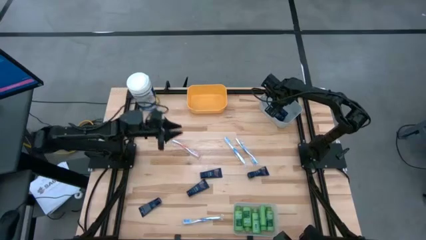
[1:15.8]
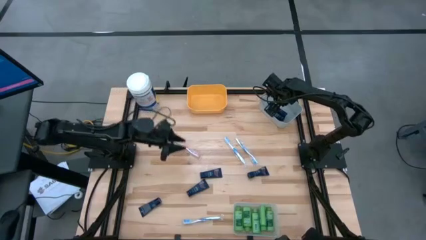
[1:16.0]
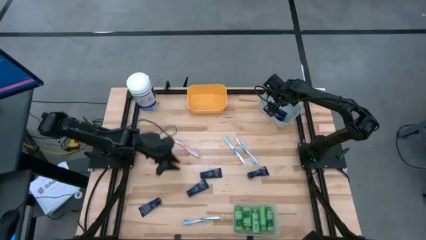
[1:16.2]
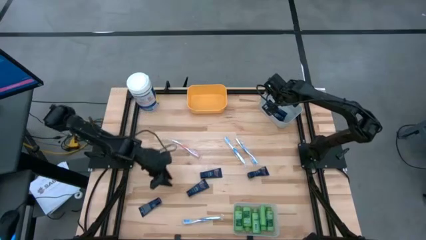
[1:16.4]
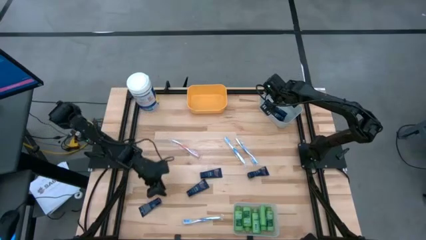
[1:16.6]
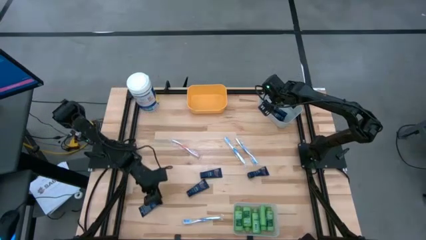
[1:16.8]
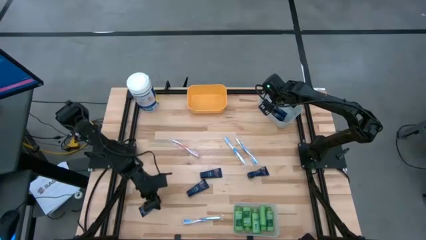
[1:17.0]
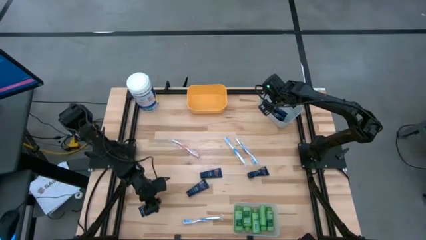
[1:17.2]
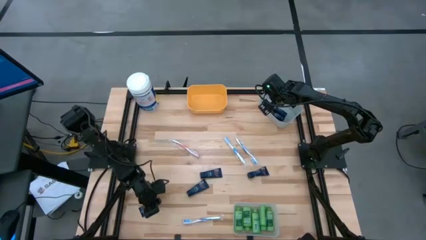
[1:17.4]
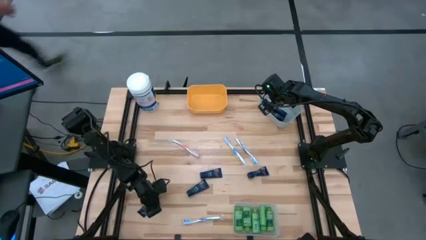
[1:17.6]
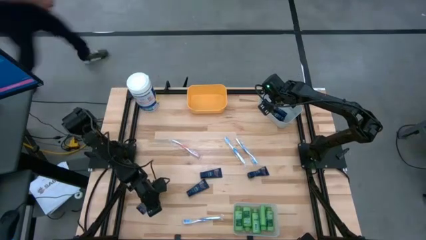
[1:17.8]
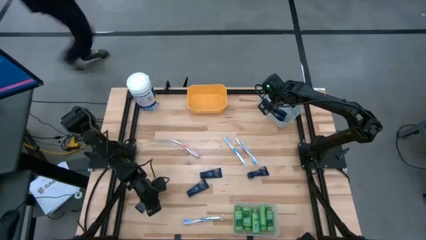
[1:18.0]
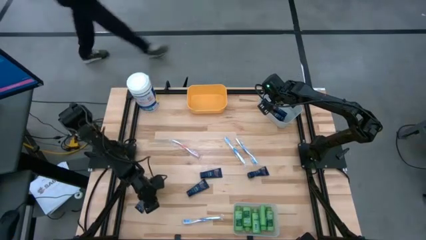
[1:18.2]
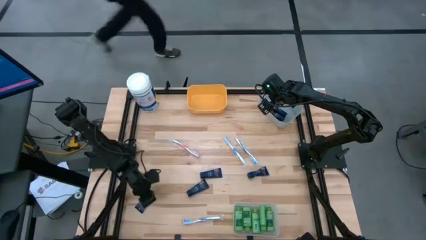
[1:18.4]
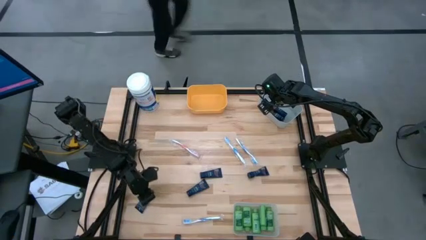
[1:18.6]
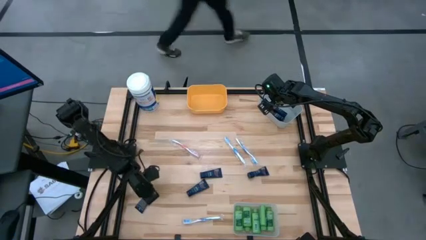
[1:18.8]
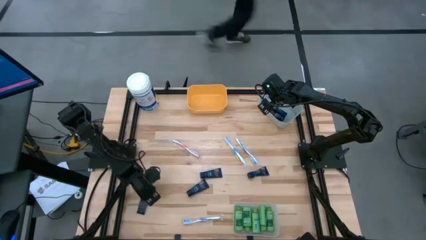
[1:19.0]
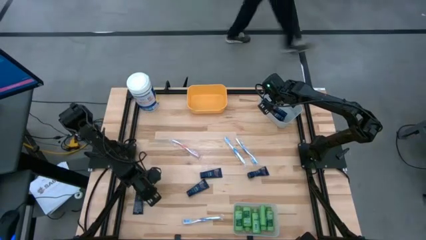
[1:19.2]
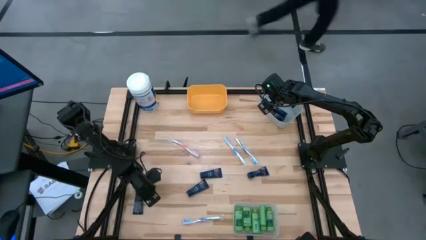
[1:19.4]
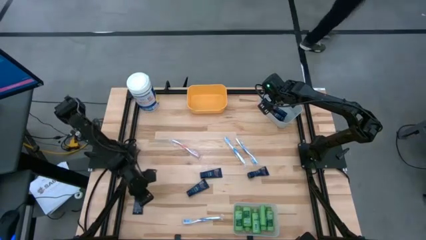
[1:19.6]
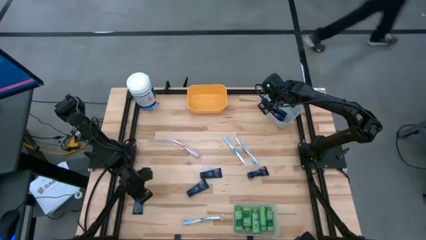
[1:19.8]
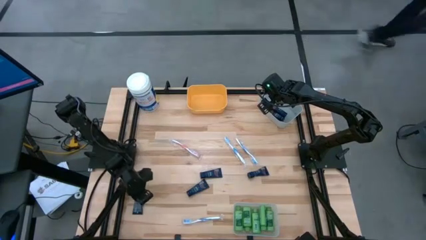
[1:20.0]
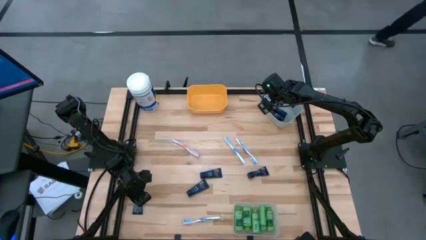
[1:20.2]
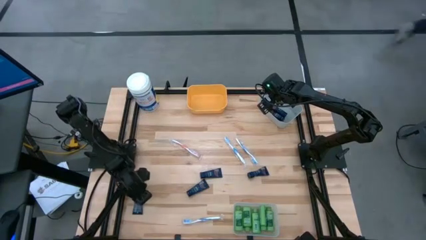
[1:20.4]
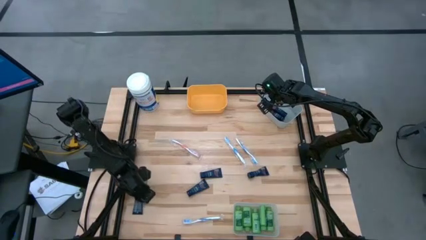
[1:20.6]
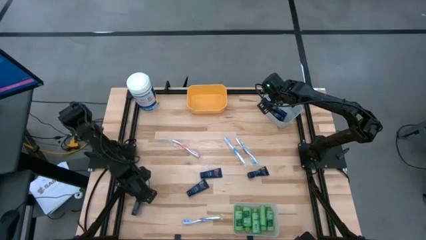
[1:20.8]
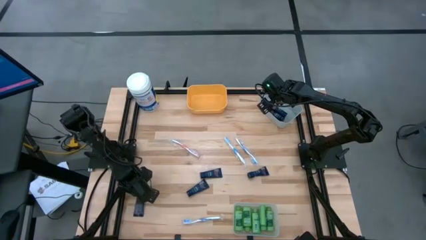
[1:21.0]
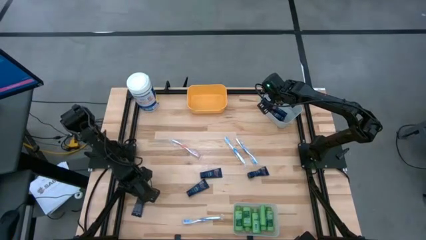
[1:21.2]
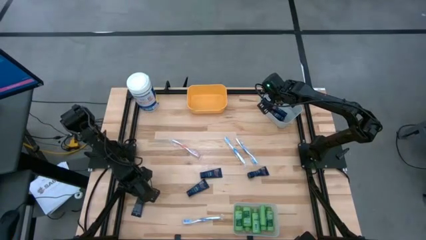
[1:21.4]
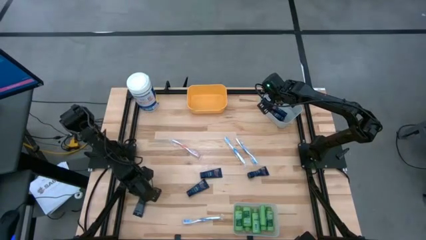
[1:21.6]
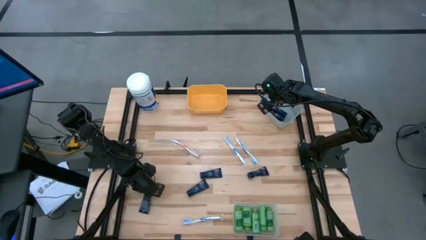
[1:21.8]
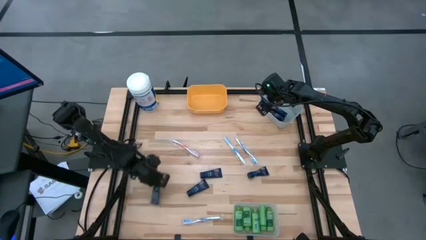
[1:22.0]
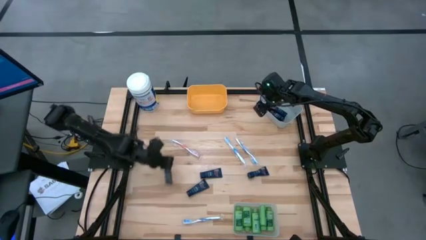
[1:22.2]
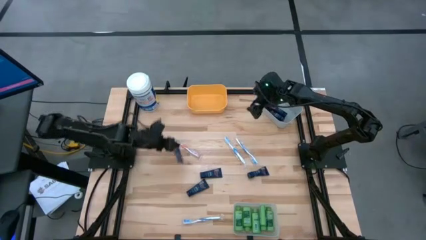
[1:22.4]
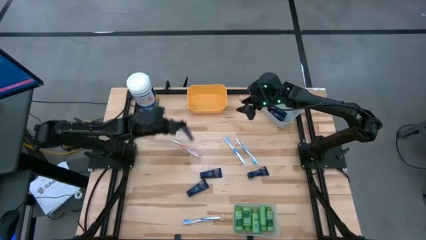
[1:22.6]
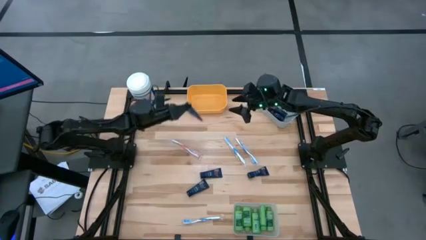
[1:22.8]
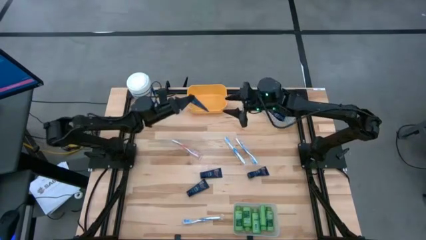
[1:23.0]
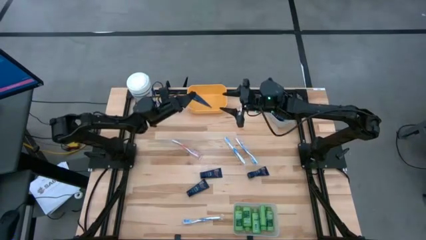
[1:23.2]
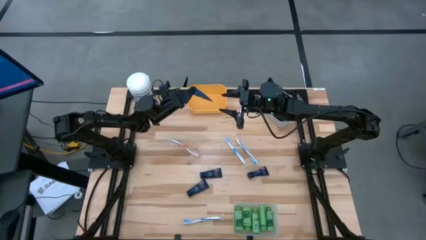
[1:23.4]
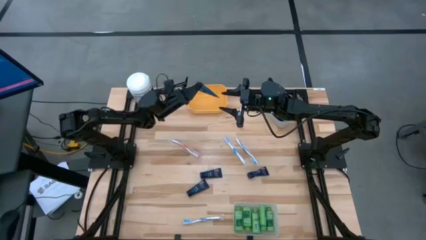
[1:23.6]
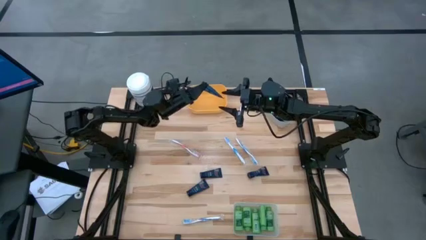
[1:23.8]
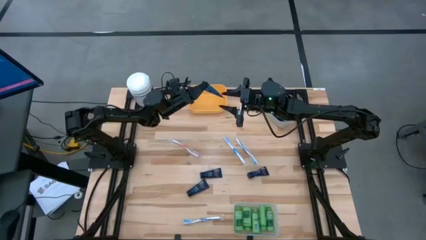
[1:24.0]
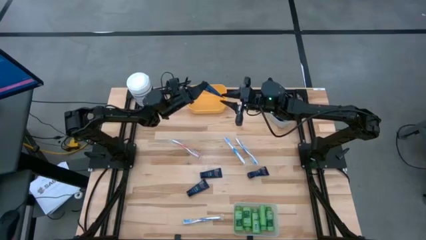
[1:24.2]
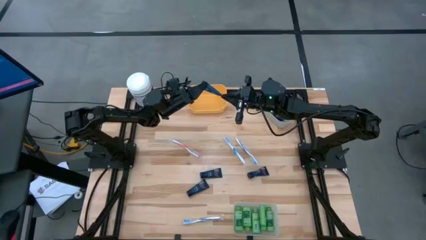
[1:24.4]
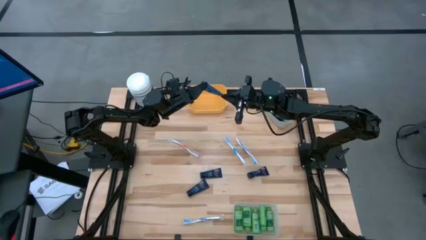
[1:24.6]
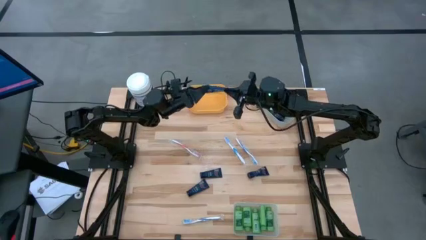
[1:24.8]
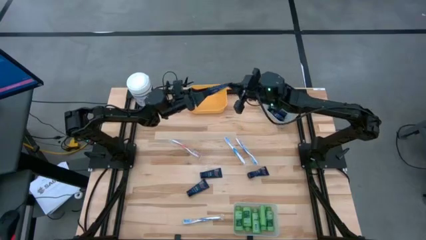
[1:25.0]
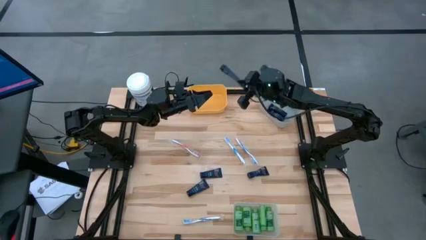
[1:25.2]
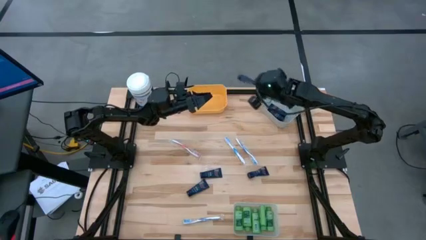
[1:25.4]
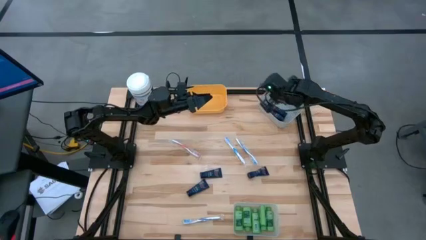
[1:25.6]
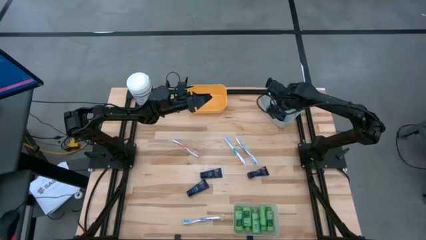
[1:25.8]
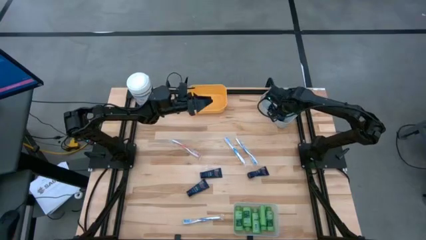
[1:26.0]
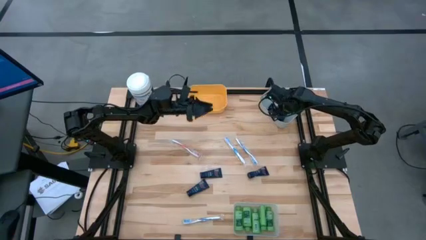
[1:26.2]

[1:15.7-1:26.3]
Task: Pick & Place Travel size toiletries
Put the blue shaving cream into the grey bin

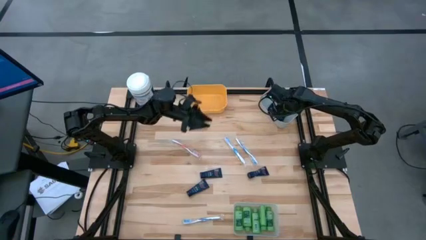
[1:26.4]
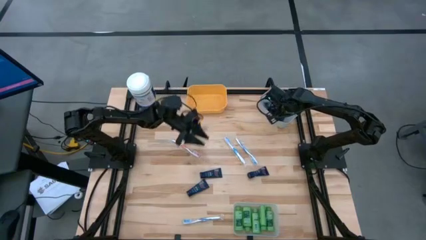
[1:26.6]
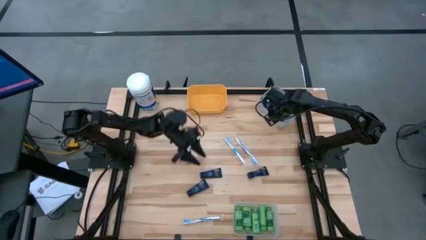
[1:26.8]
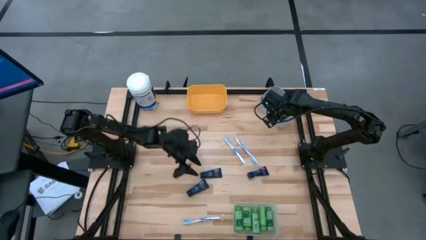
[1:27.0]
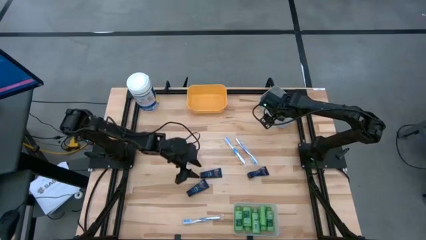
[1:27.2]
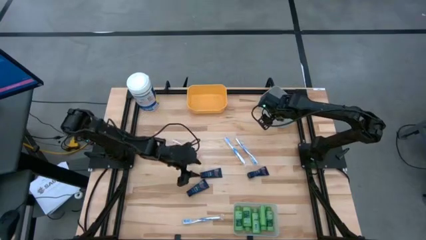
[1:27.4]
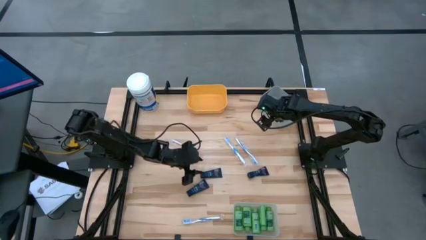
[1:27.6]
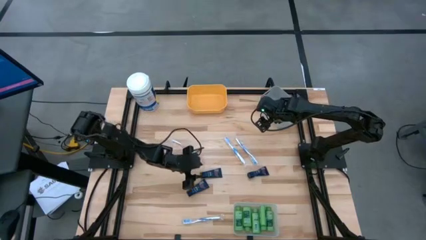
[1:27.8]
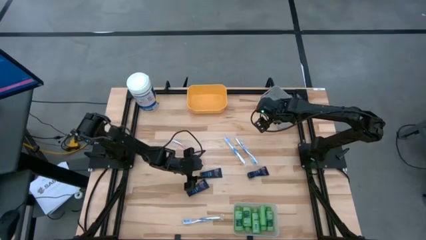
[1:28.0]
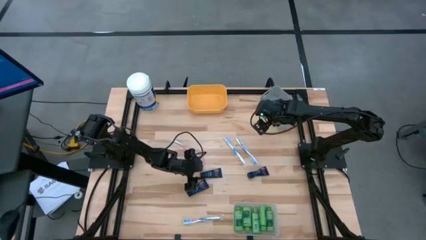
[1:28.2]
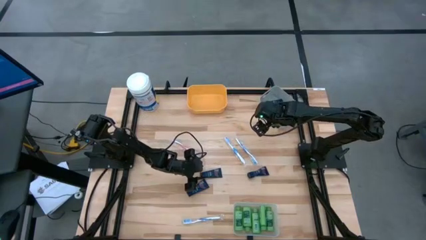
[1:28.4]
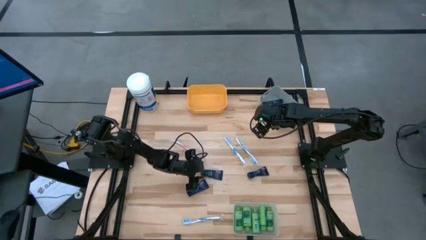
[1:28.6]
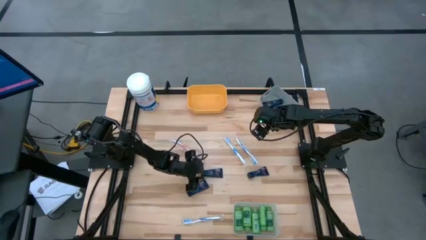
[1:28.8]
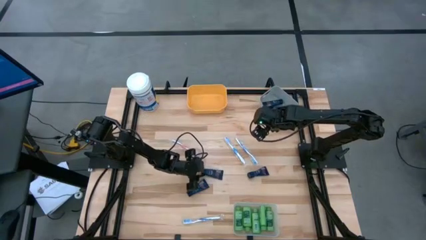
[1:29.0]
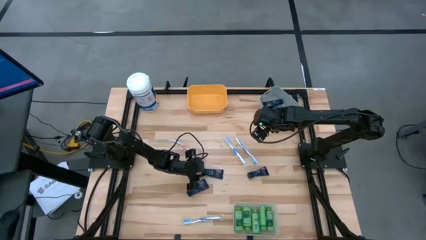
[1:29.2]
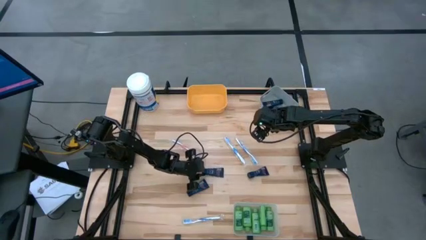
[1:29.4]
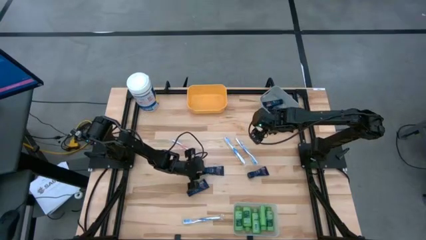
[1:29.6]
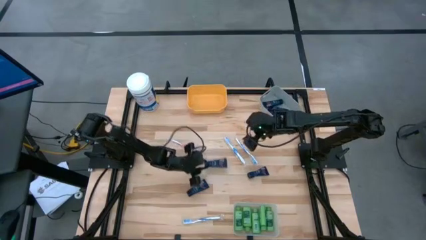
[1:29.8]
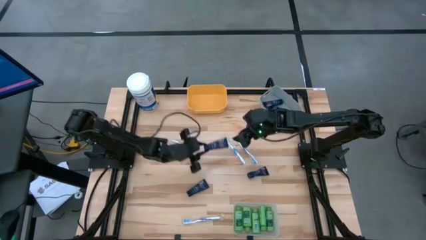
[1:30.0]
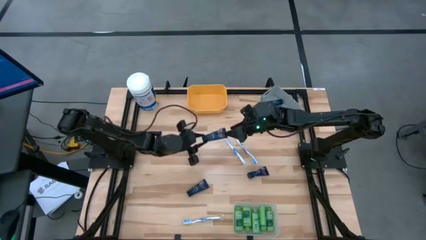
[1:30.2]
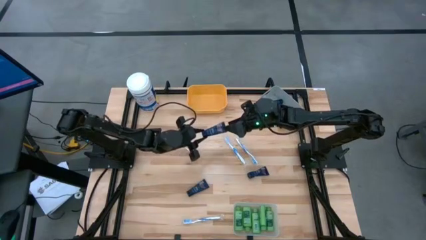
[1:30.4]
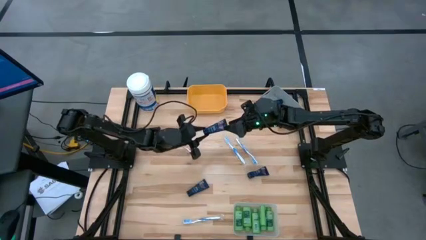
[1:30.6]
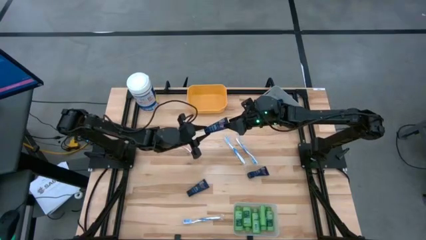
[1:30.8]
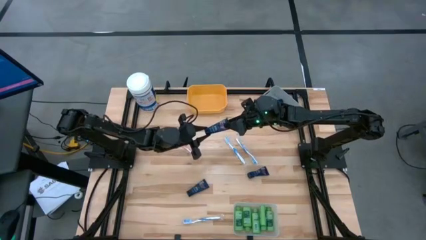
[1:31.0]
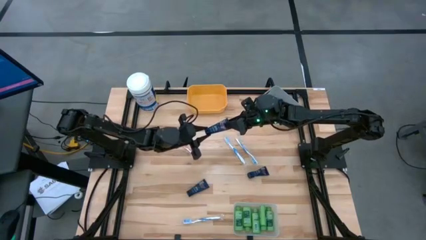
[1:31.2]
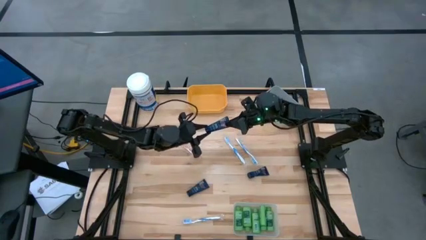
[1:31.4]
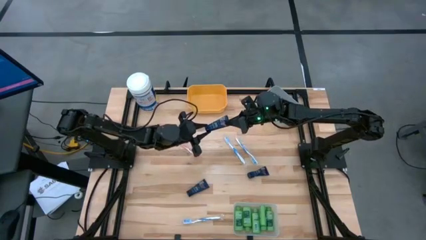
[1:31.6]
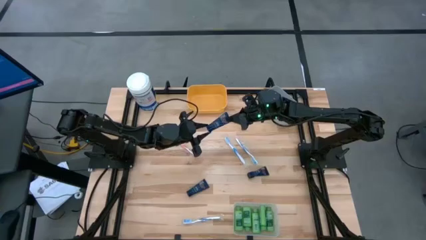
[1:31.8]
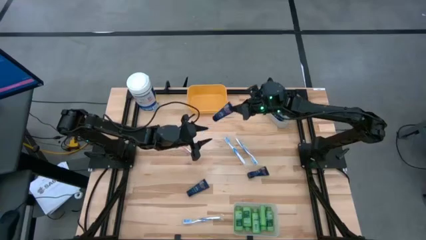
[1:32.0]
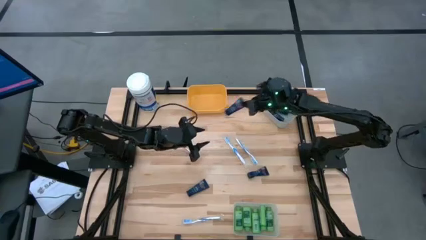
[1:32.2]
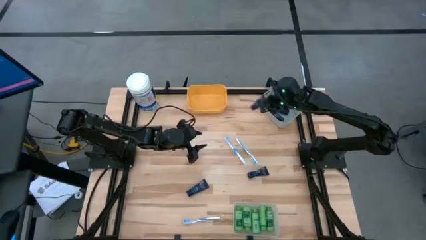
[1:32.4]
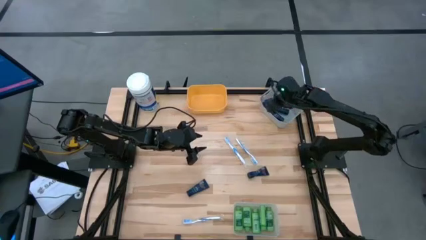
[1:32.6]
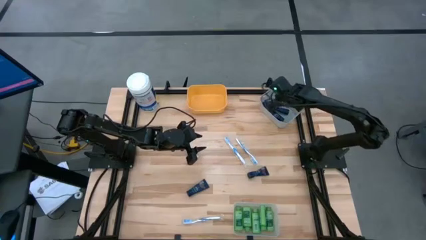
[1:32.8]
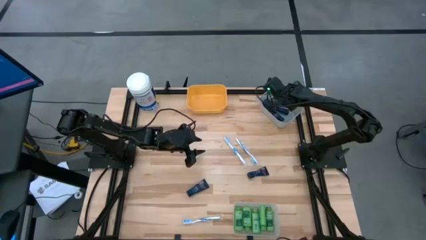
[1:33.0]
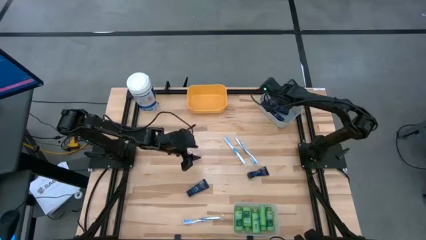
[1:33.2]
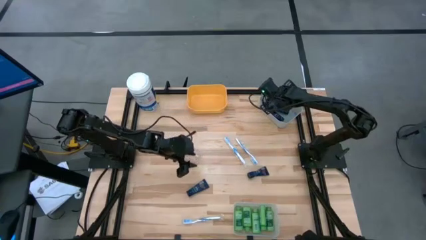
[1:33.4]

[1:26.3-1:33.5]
Put the blue shaving cream into the grey bin
